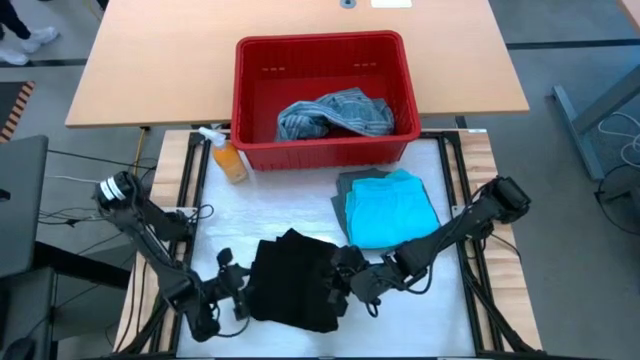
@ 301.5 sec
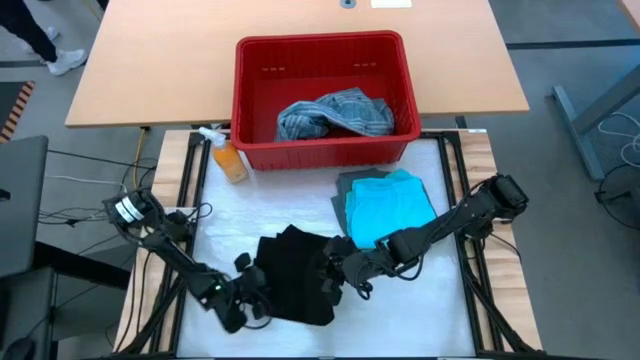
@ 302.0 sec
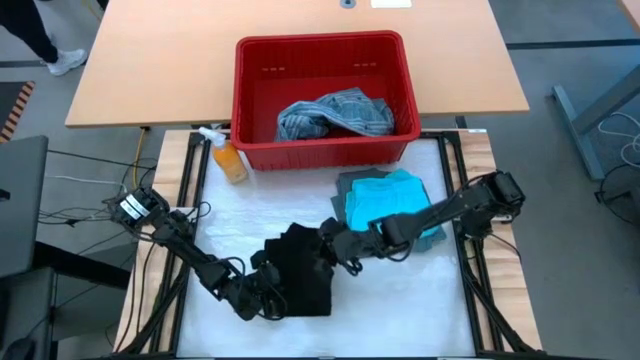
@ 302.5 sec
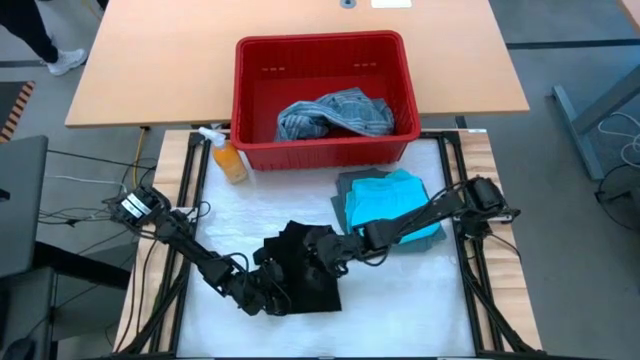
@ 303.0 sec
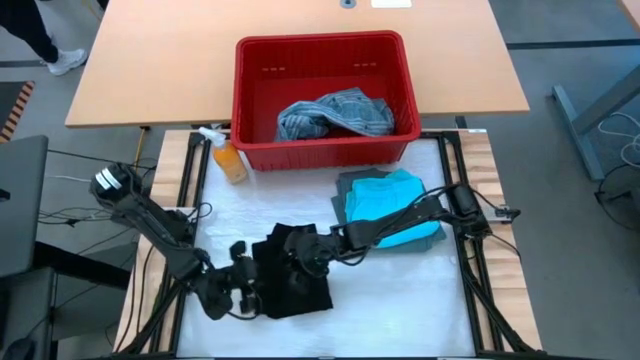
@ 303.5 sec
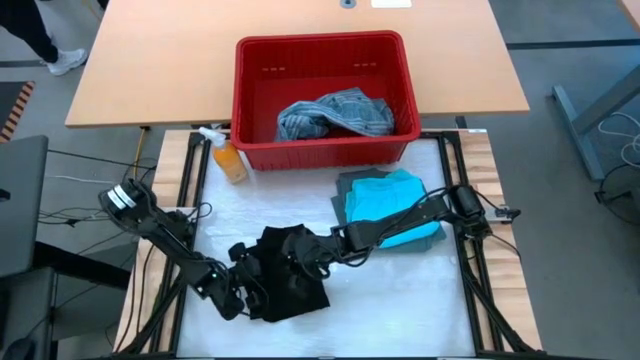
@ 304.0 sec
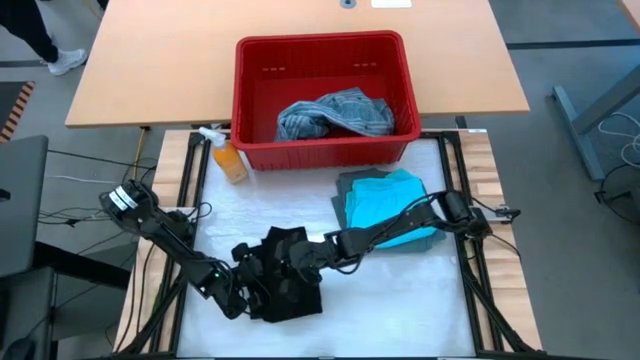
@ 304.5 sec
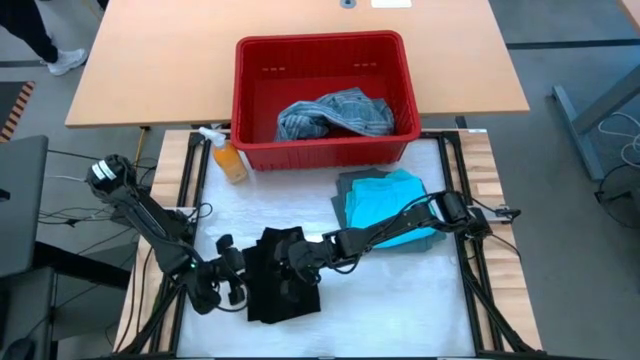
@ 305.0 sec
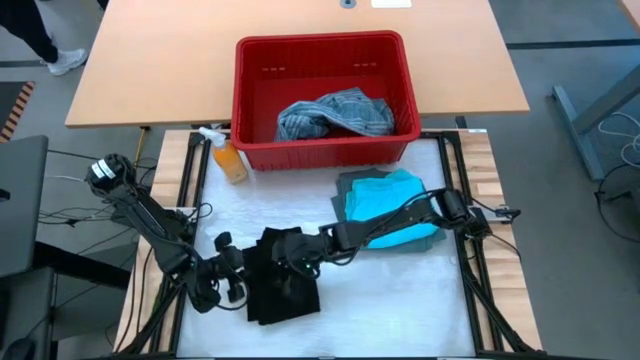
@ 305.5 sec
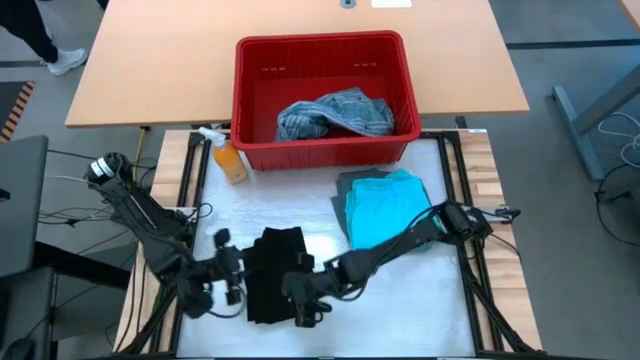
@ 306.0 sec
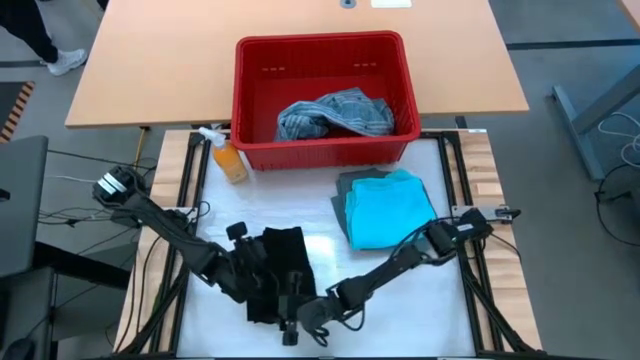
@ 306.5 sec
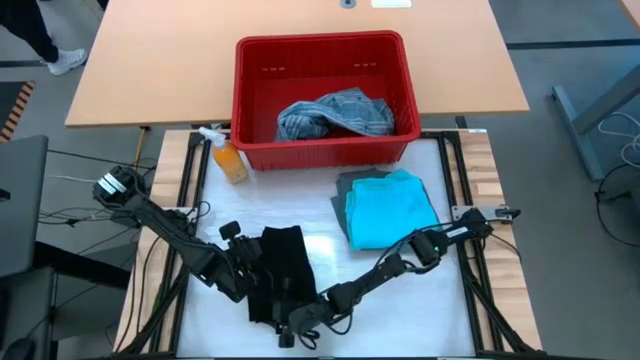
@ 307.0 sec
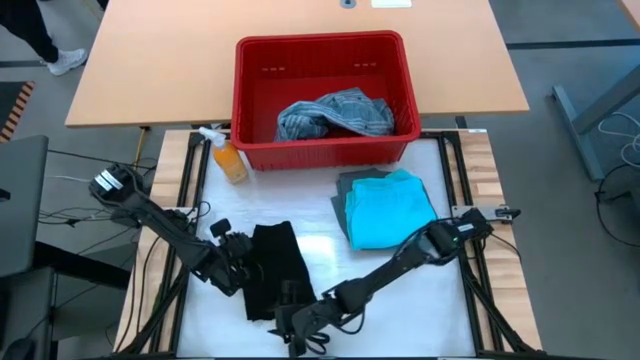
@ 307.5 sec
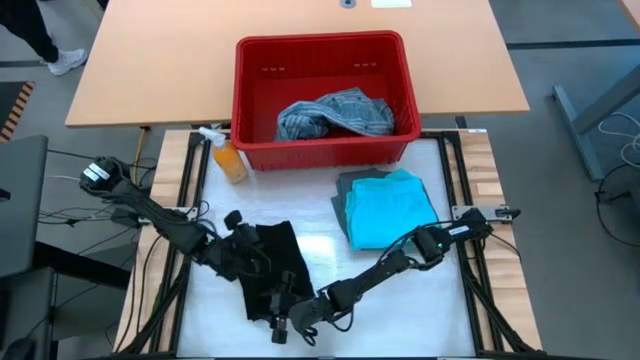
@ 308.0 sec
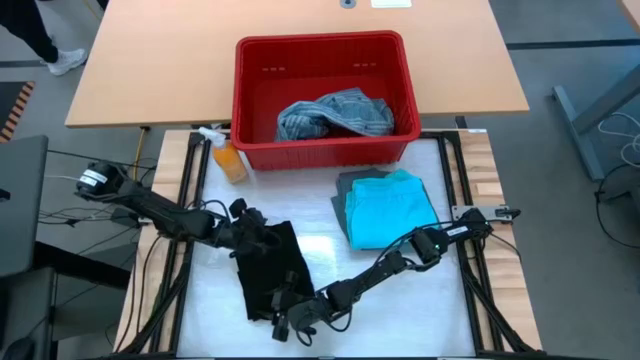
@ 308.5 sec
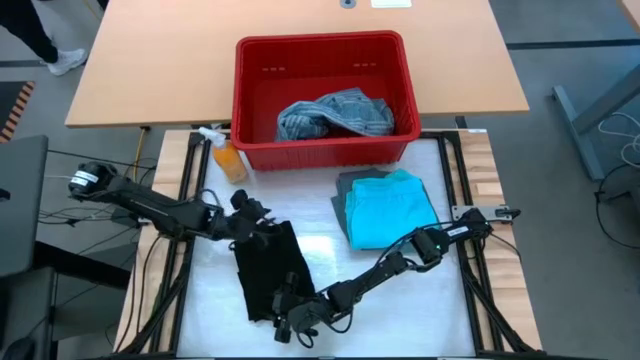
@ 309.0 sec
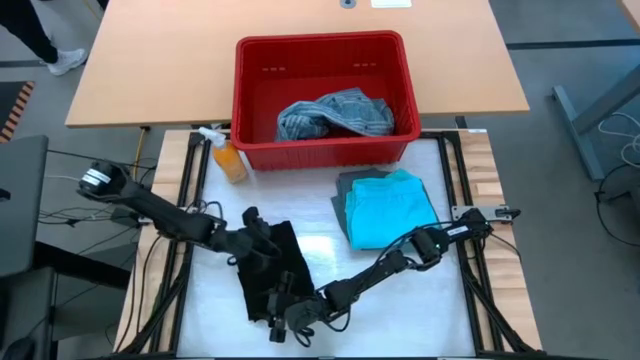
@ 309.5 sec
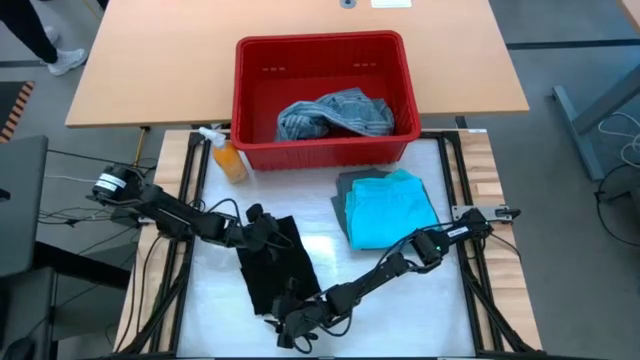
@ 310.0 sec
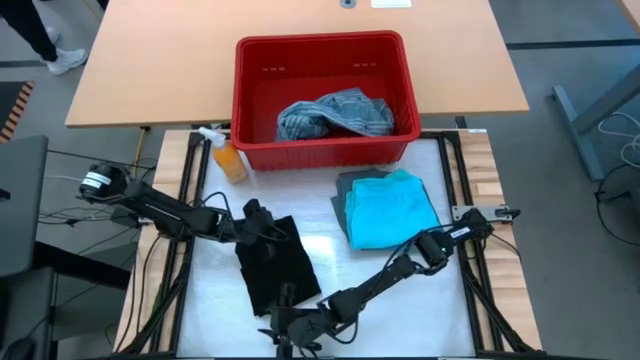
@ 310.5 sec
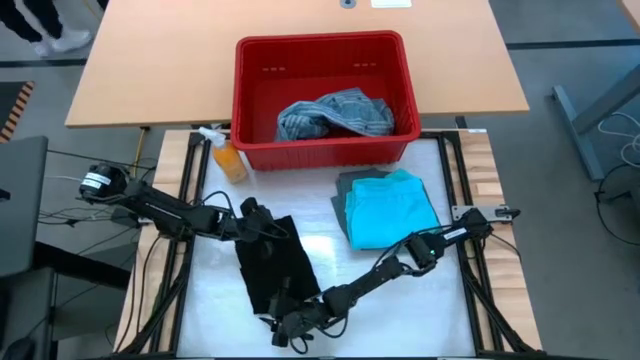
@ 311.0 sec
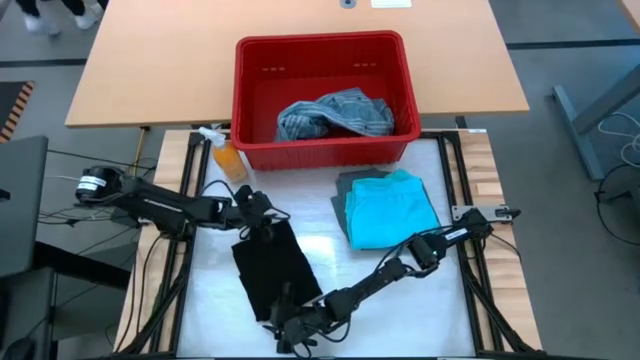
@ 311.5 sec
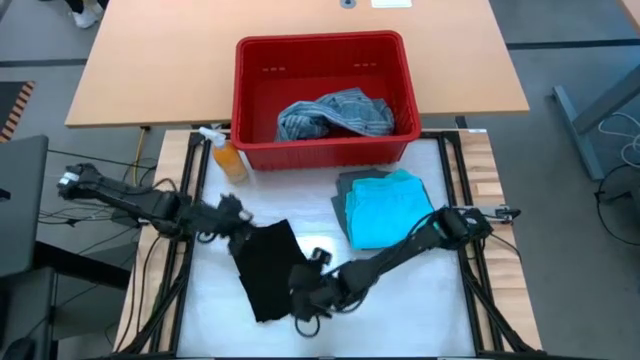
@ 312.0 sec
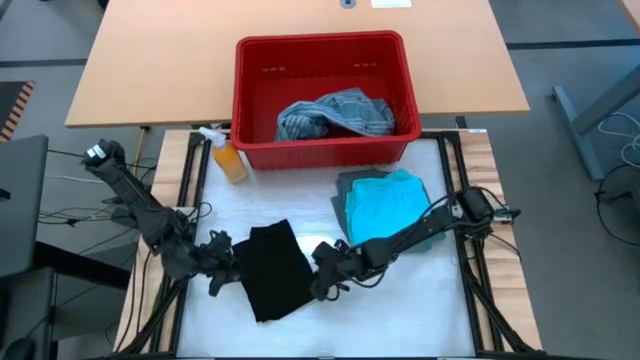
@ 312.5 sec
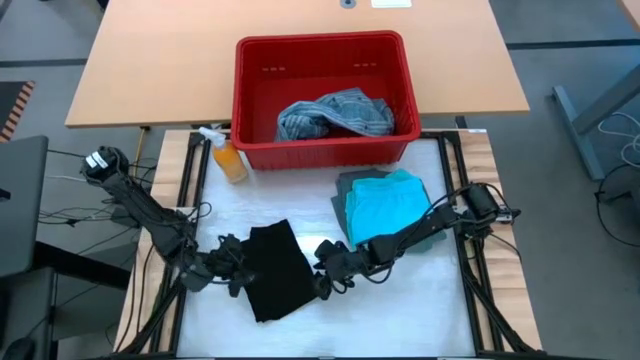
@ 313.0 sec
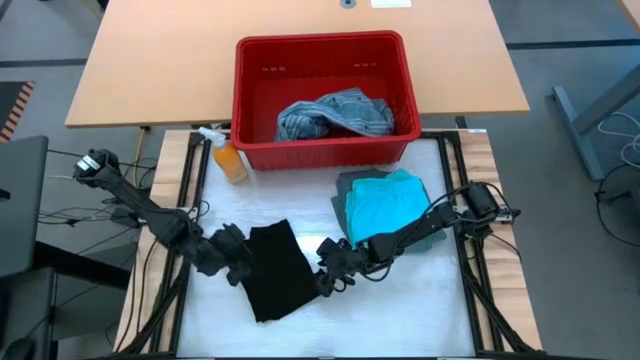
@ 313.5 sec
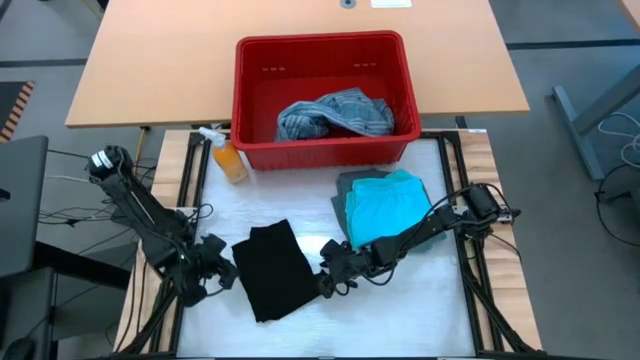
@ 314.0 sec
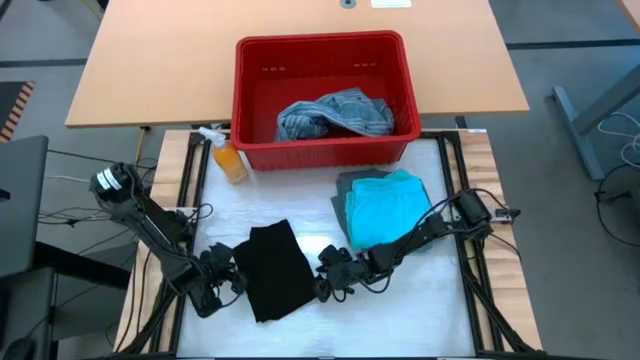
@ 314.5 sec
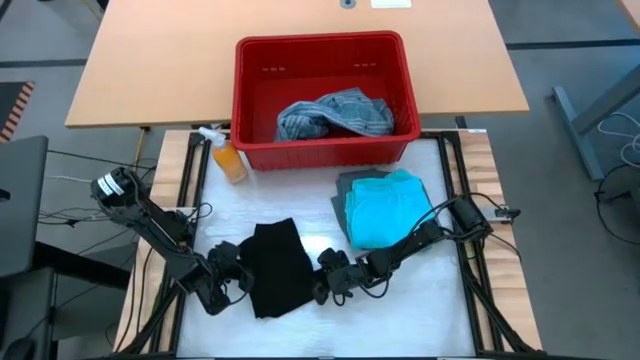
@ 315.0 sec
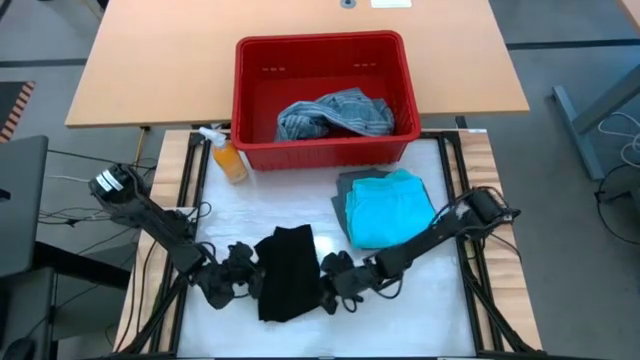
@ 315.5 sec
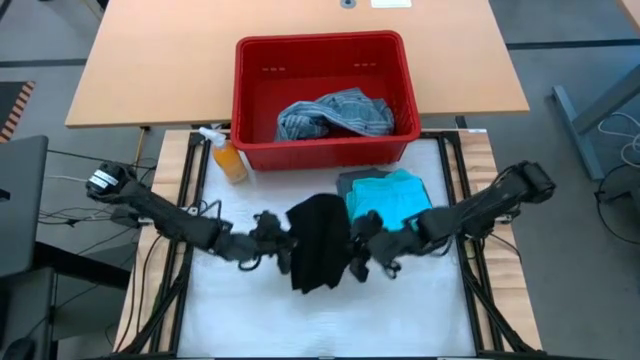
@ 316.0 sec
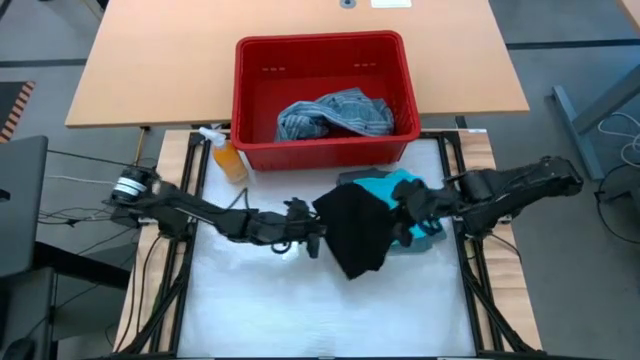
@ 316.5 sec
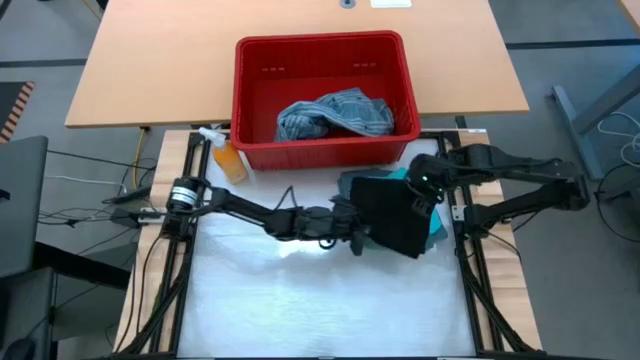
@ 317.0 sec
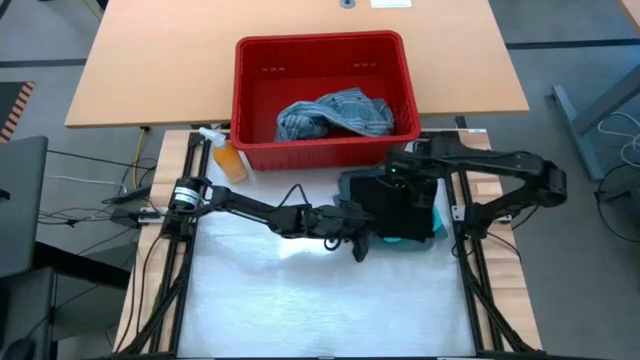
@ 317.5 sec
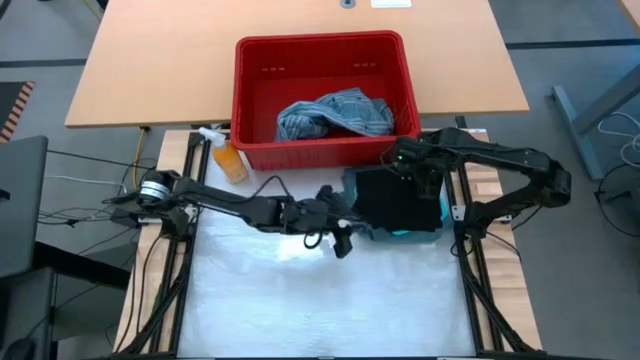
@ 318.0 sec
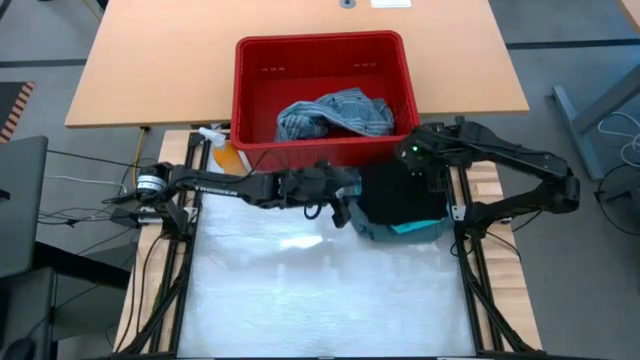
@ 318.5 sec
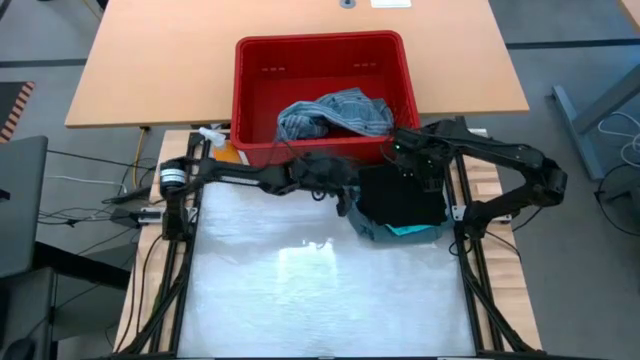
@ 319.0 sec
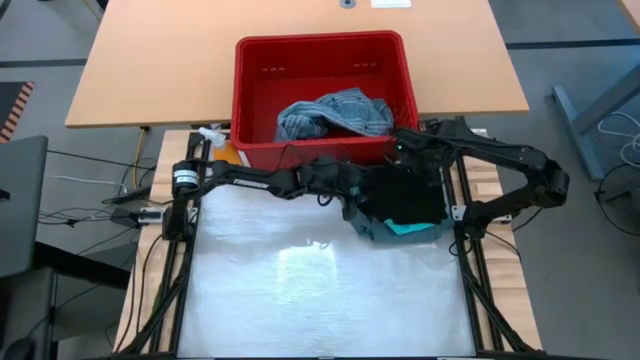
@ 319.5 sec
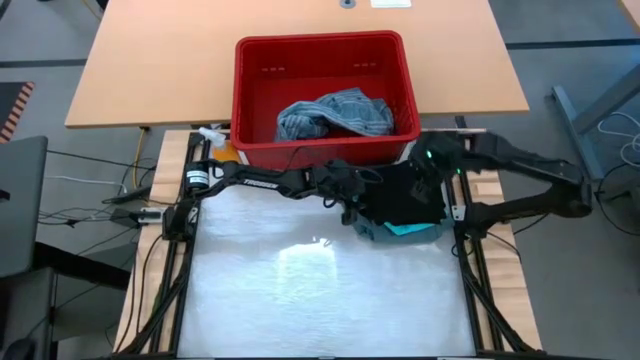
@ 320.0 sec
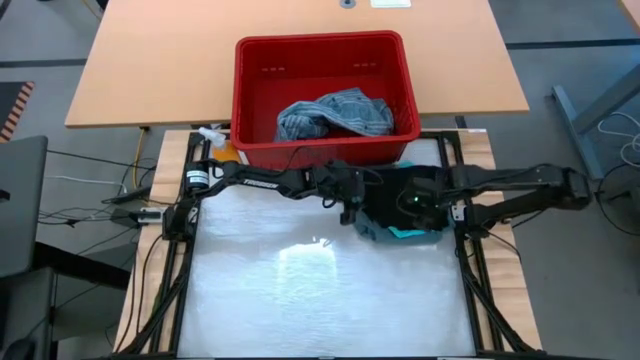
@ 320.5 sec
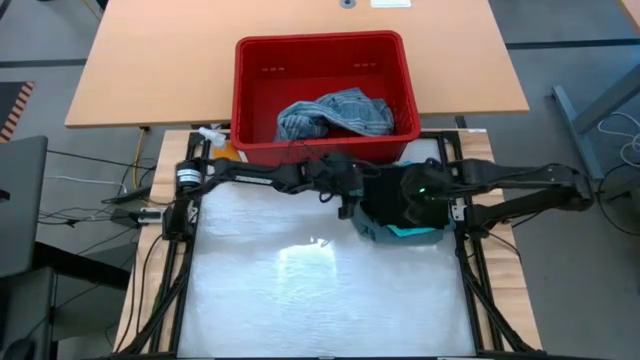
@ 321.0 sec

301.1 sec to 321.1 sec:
Task: Fold Laundry from Bin
Fold the black shirt
